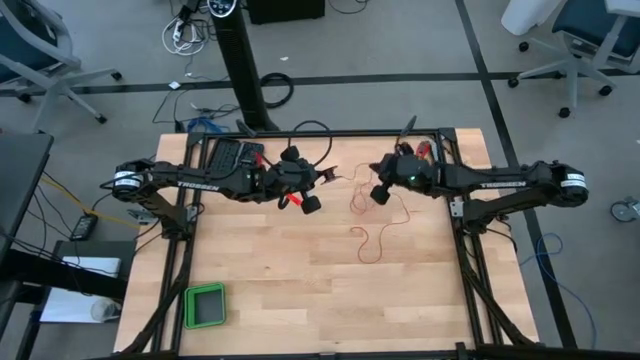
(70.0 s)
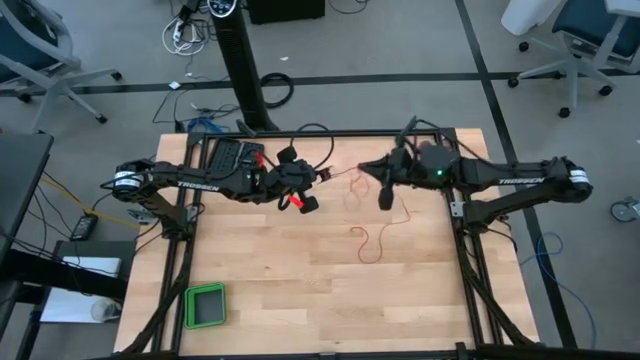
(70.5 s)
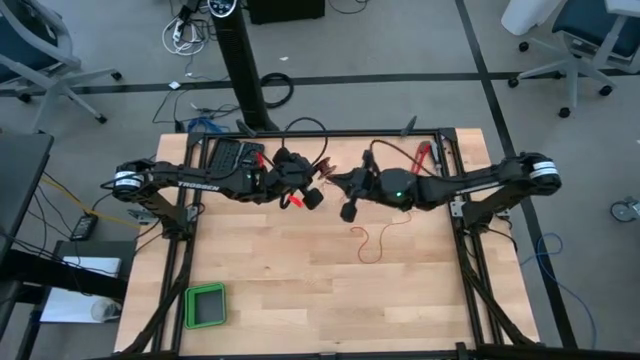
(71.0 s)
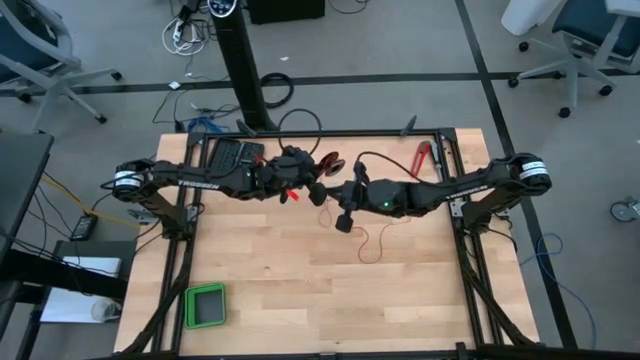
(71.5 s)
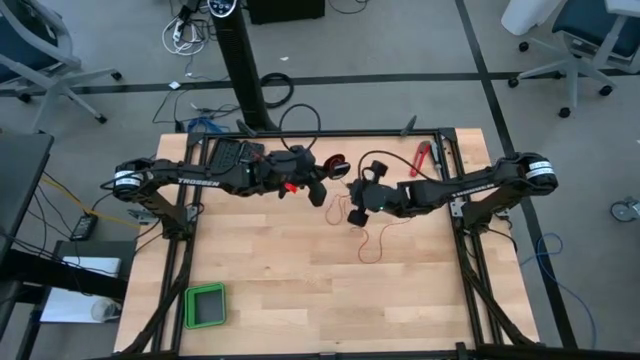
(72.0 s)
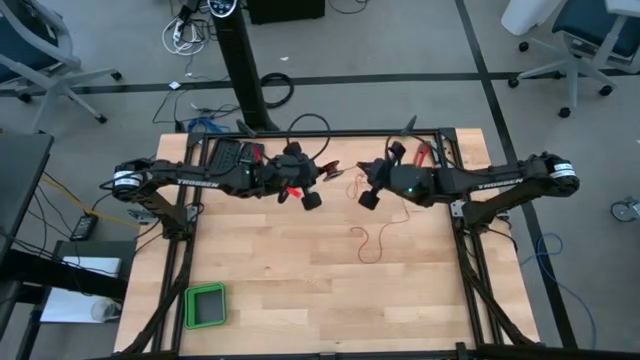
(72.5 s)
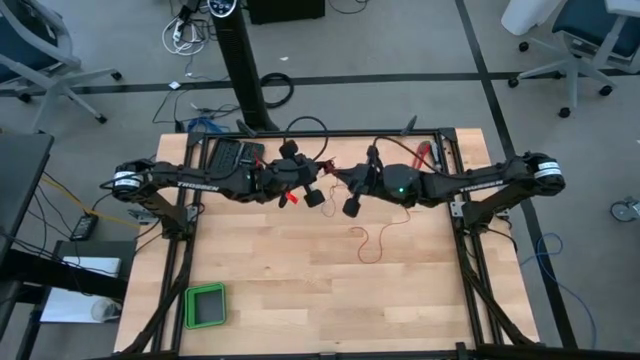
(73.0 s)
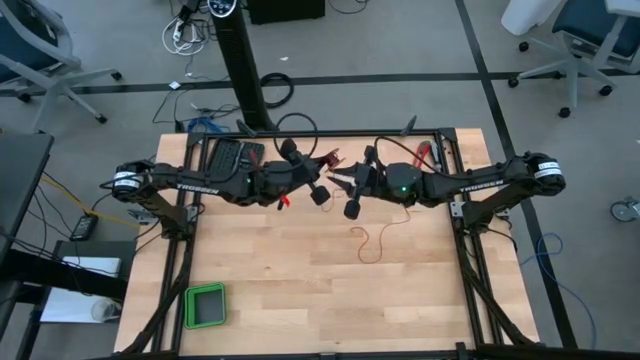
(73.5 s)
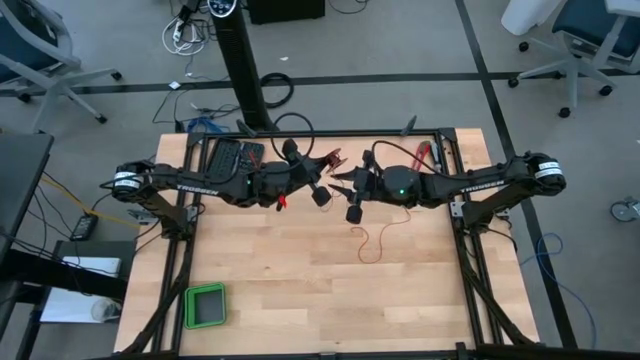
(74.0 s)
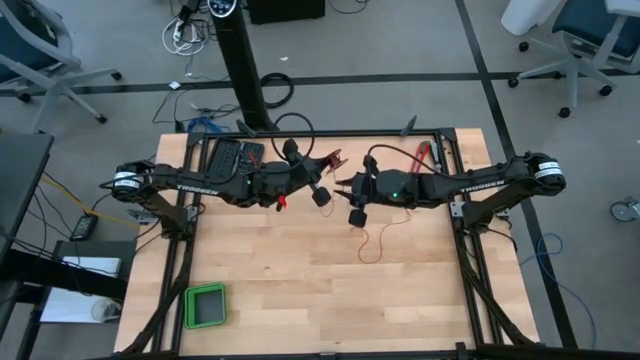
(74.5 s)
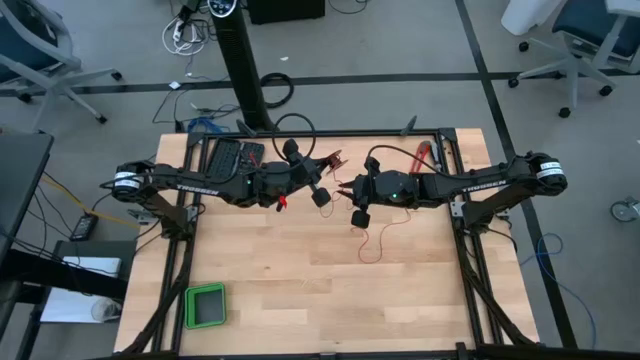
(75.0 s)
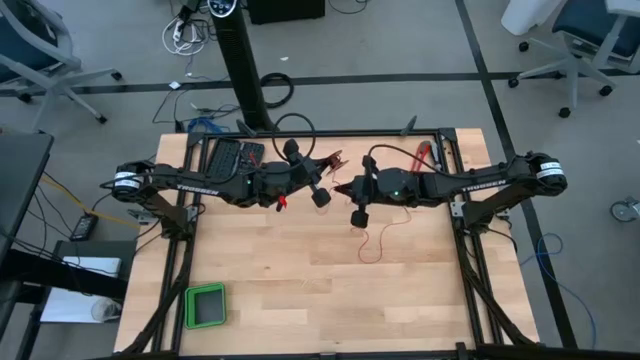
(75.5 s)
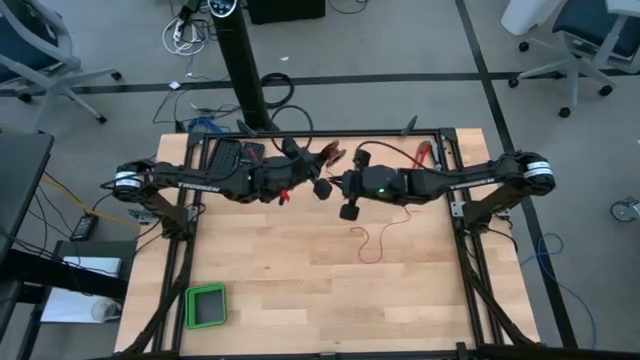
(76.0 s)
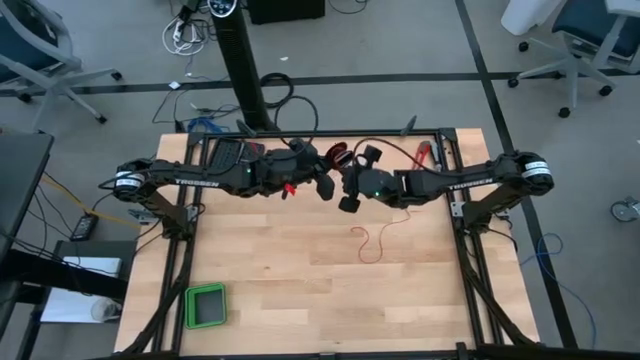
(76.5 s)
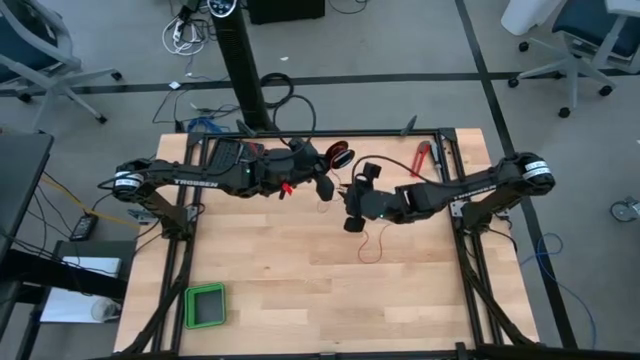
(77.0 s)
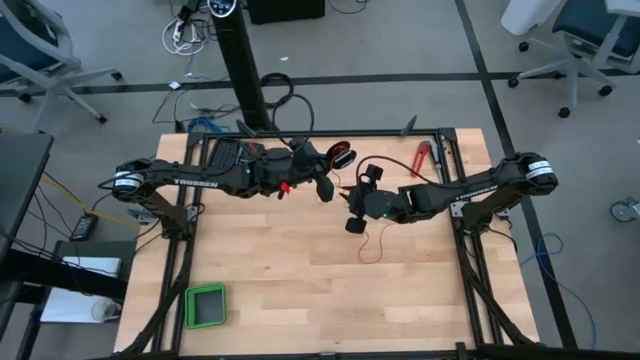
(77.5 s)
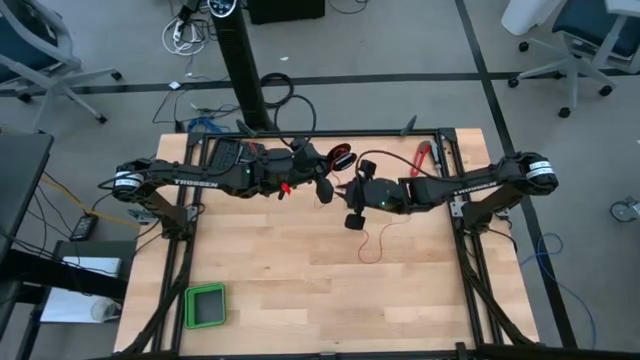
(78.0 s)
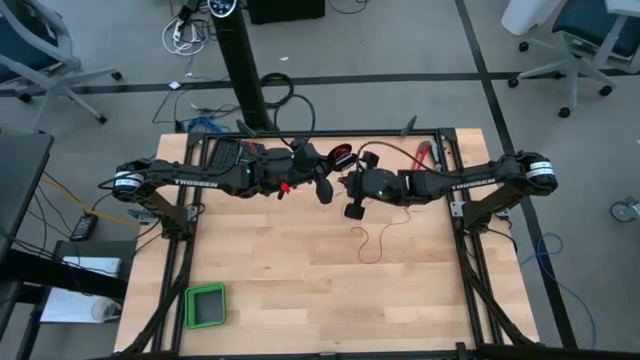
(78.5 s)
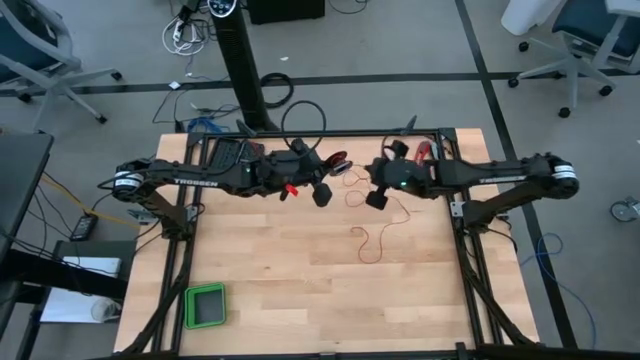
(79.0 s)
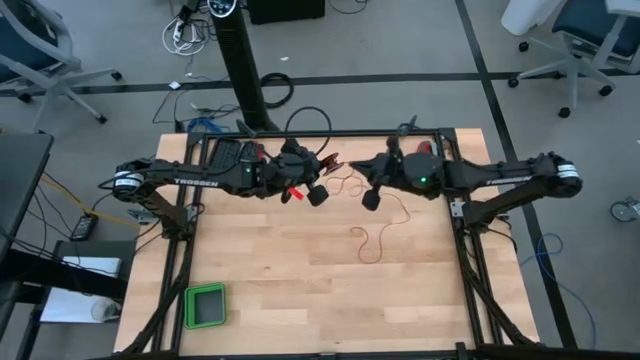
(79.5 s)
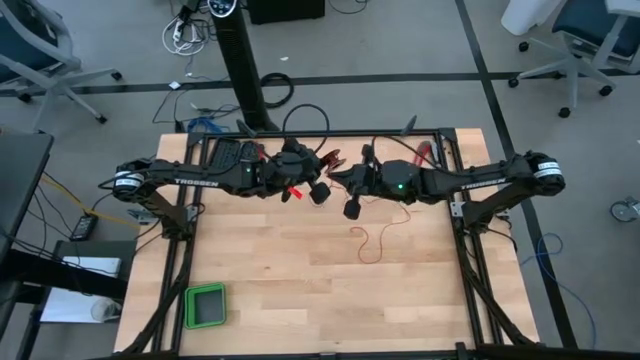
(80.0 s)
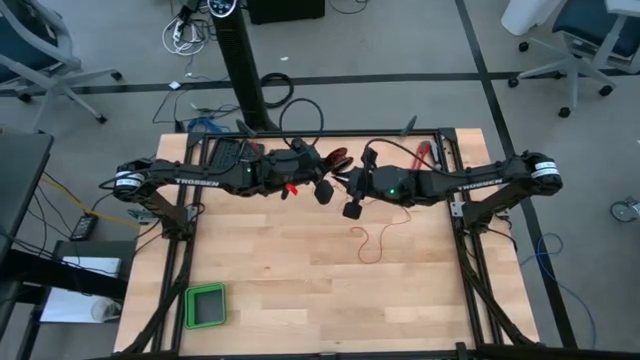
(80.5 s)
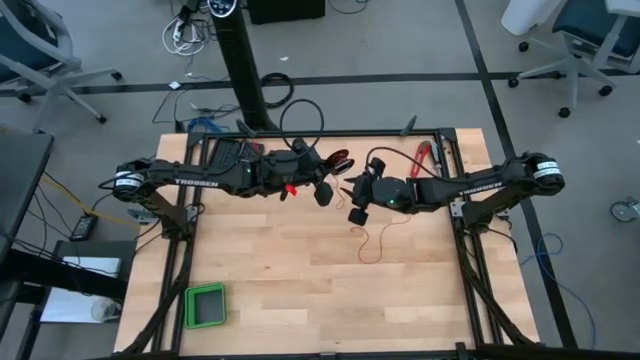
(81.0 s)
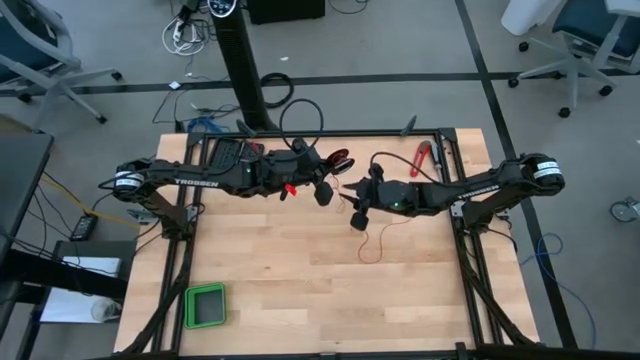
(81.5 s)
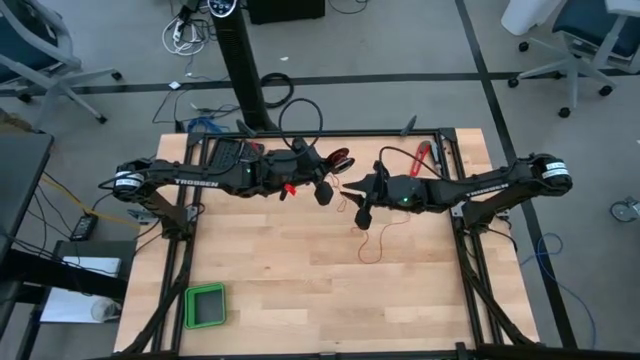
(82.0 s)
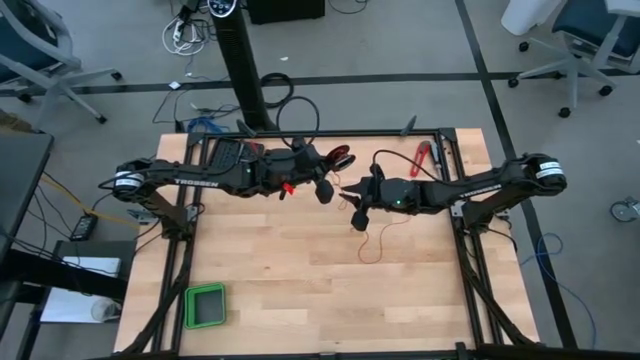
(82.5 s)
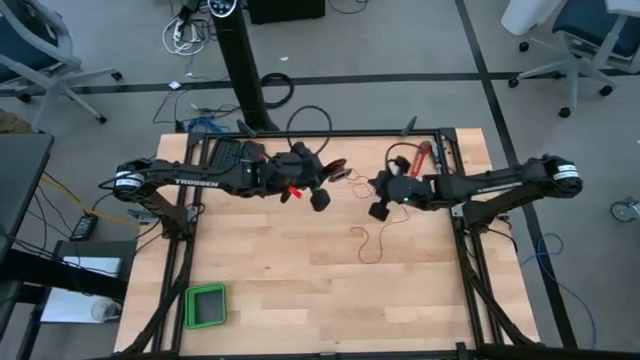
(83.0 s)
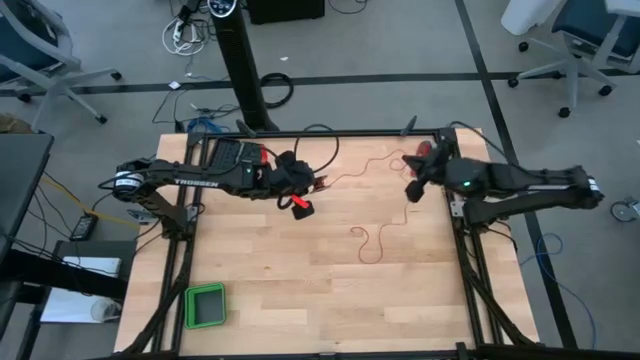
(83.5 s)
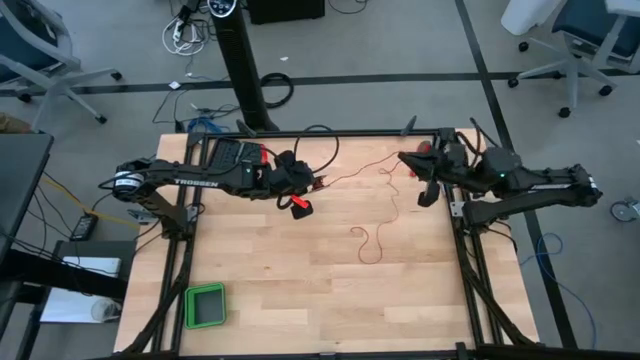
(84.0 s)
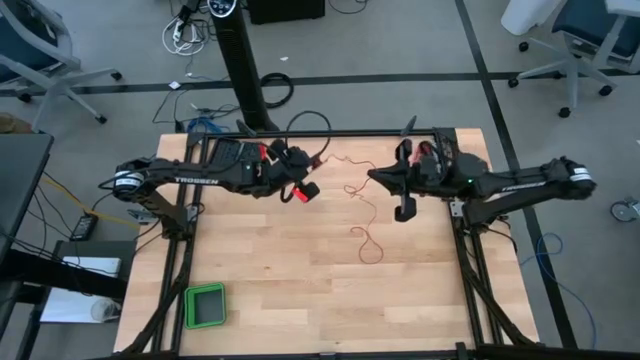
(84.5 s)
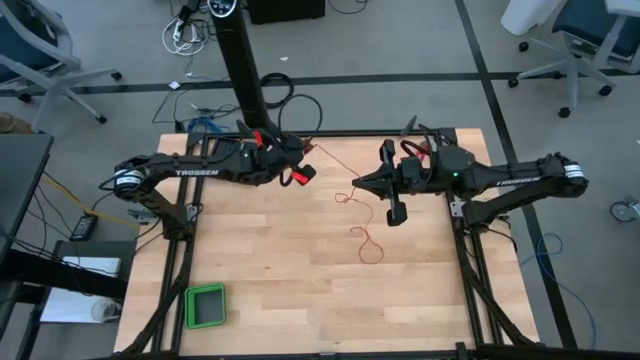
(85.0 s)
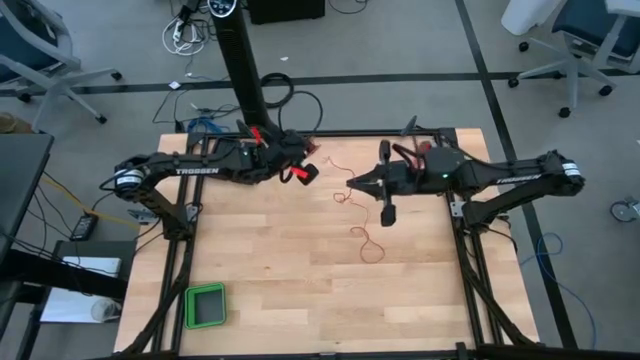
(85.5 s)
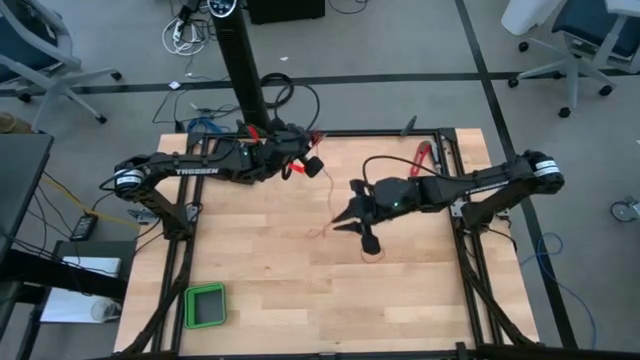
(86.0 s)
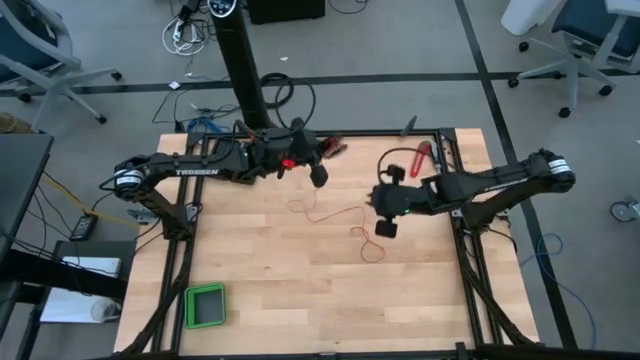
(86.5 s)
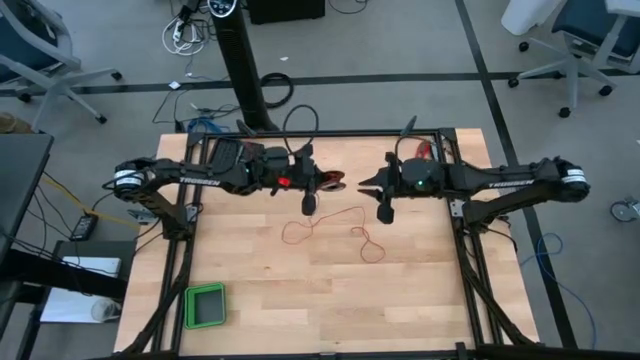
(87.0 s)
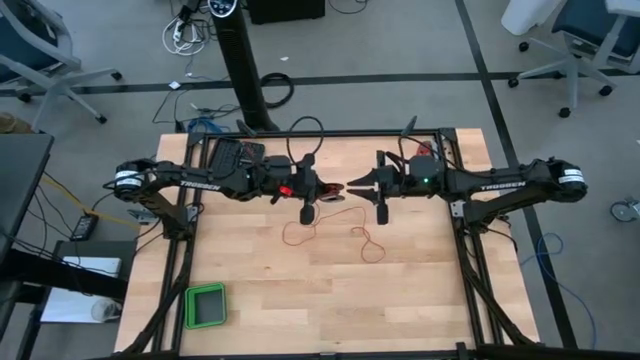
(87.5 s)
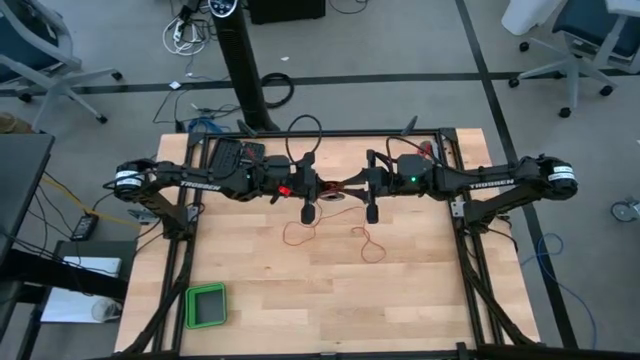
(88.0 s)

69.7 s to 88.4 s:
Task: Coil cords
Coil the red wire onto the black spool

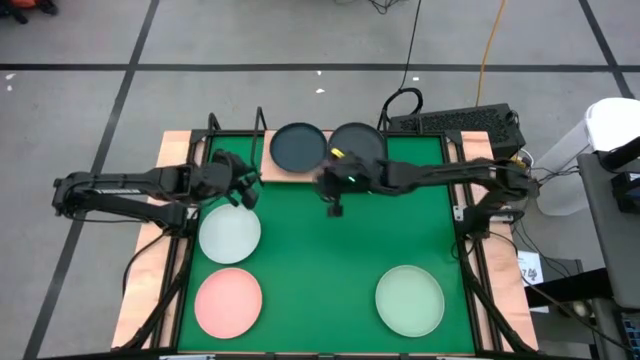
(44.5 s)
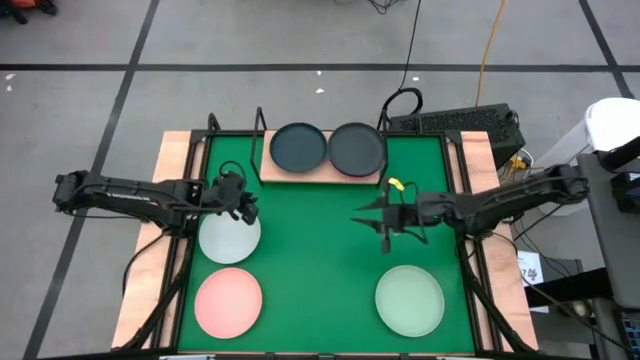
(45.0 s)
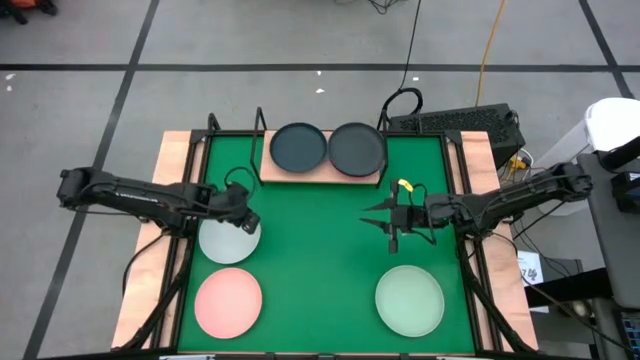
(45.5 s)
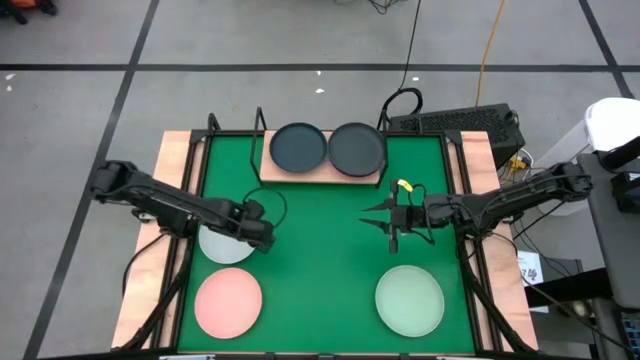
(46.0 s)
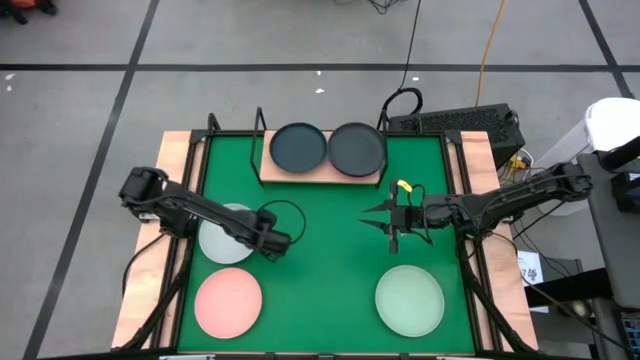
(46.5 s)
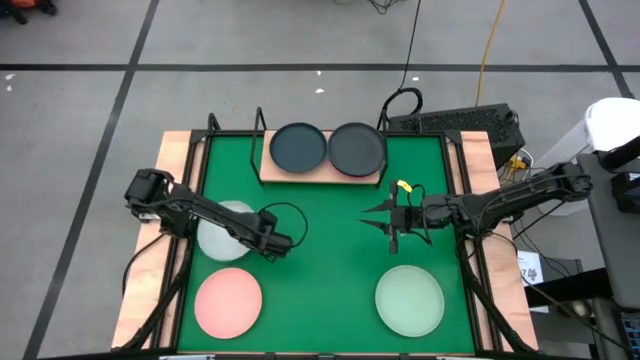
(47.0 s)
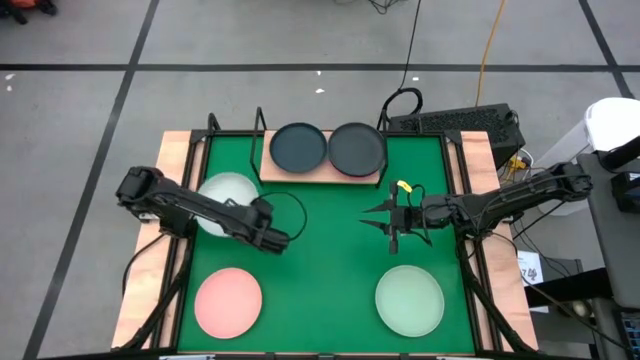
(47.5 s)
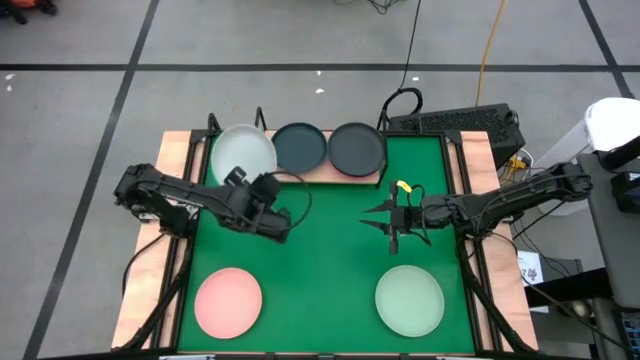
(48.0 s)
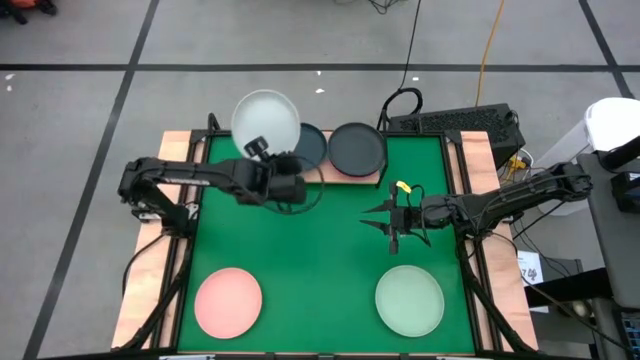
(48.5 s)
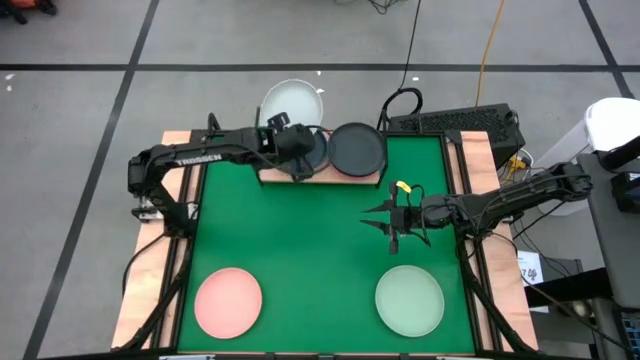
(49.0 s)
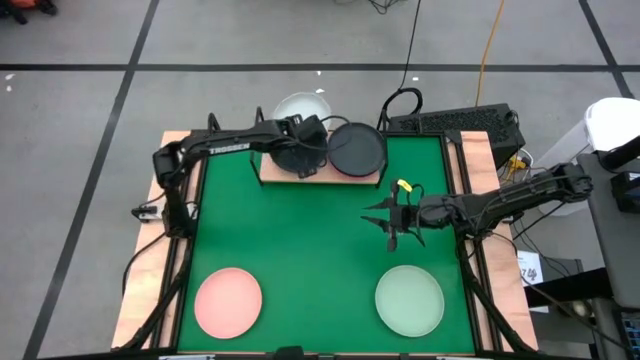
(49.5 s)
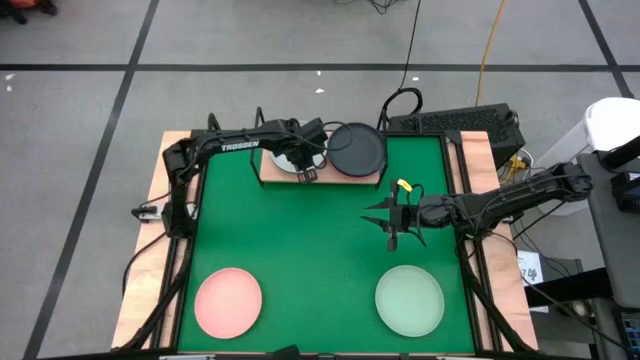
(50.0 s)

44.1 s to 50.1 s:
Task: Place and stack plates onto a shelf
Stack the white plate on top of the dark blue plate on the shelf
